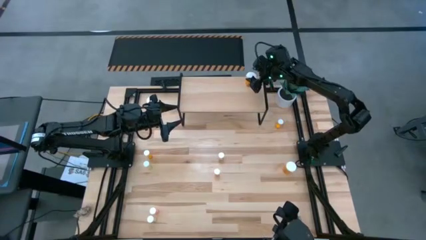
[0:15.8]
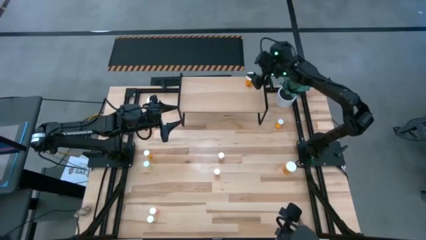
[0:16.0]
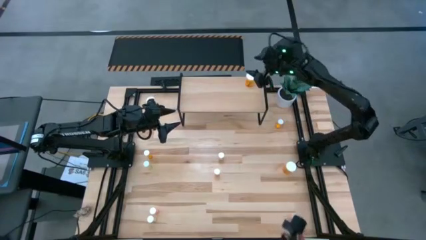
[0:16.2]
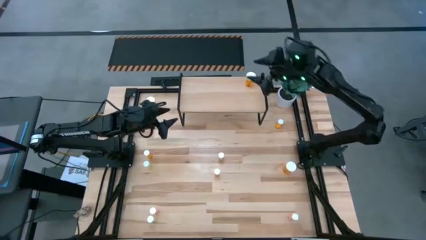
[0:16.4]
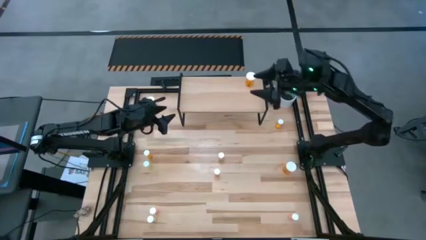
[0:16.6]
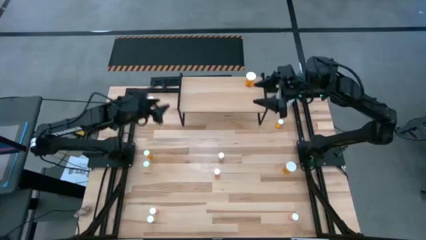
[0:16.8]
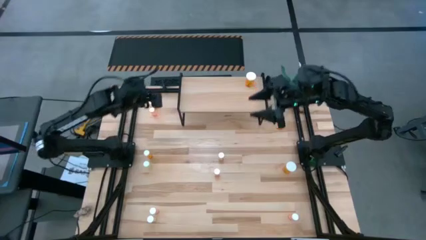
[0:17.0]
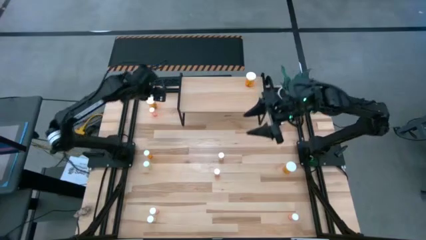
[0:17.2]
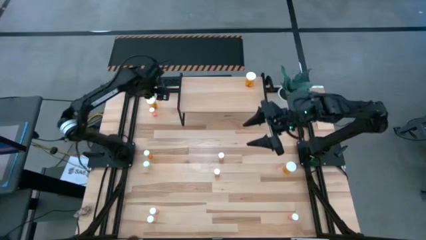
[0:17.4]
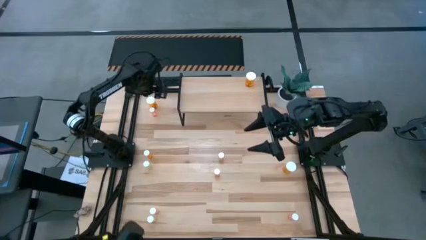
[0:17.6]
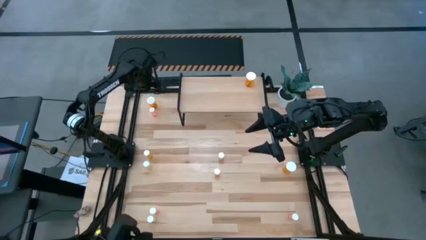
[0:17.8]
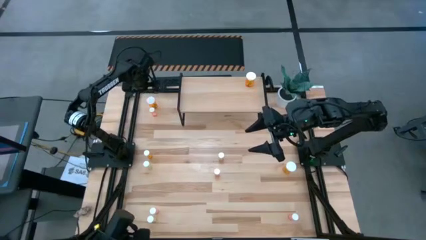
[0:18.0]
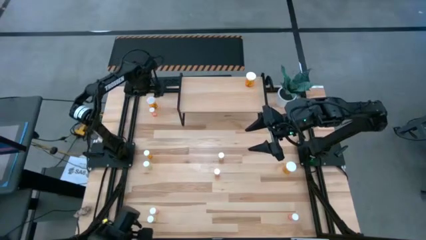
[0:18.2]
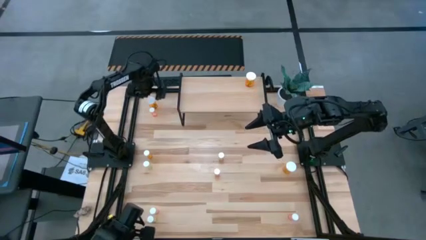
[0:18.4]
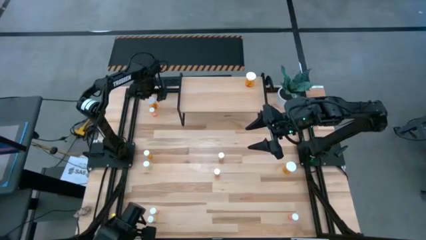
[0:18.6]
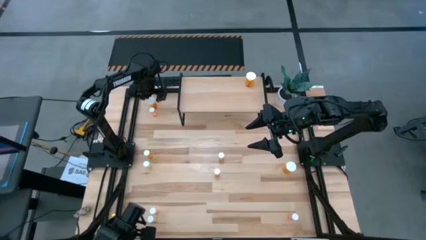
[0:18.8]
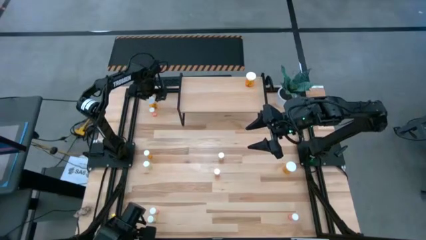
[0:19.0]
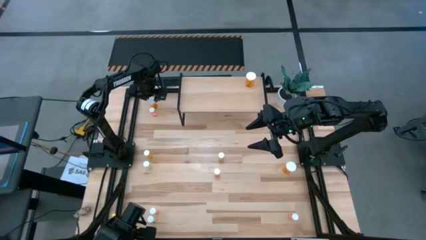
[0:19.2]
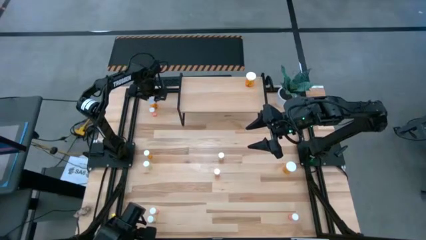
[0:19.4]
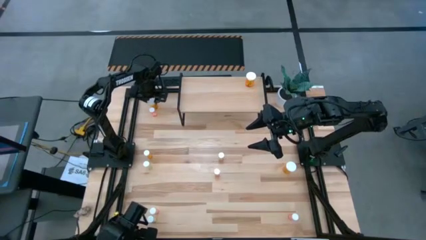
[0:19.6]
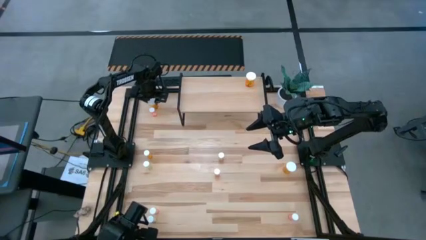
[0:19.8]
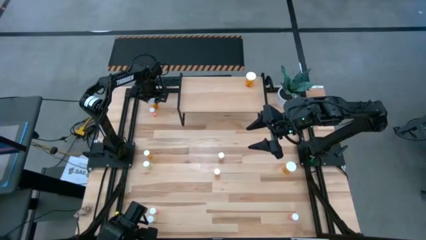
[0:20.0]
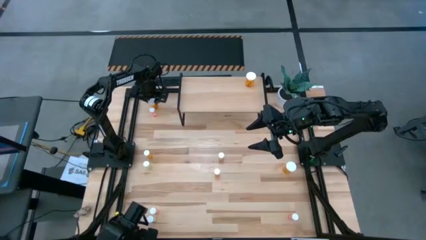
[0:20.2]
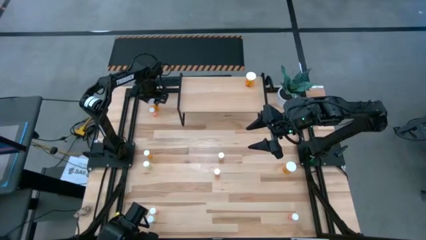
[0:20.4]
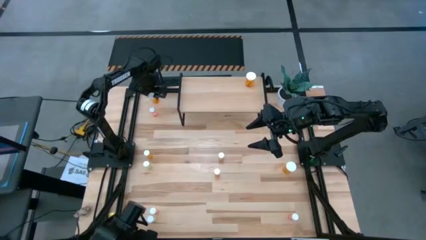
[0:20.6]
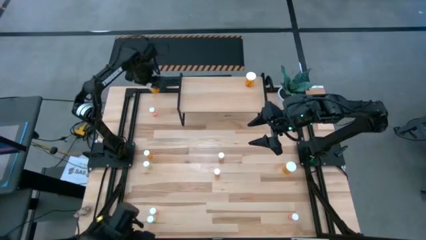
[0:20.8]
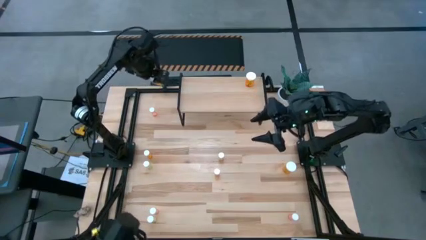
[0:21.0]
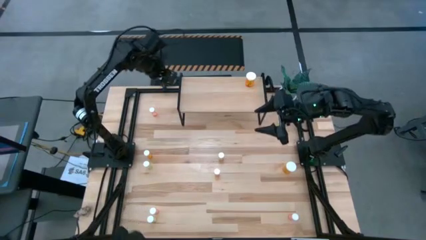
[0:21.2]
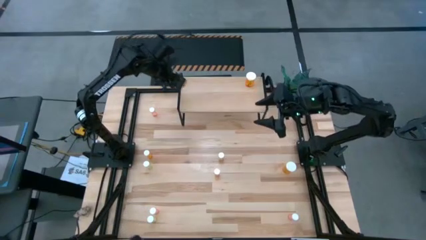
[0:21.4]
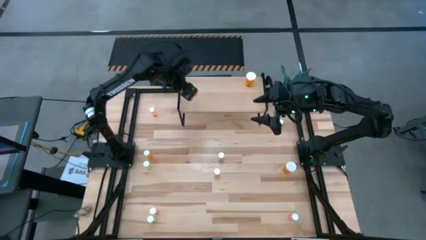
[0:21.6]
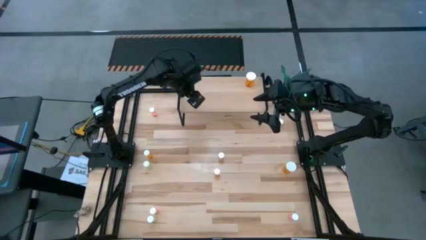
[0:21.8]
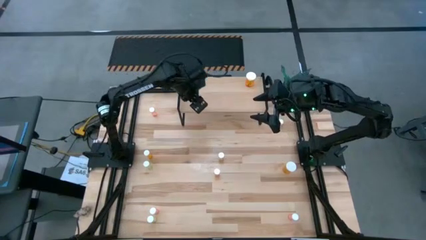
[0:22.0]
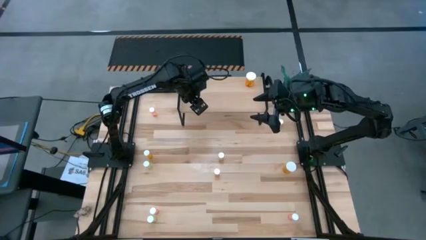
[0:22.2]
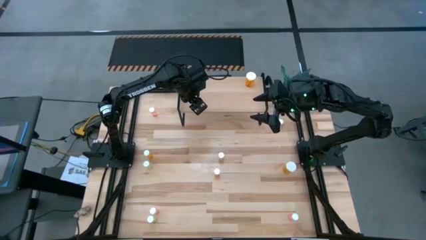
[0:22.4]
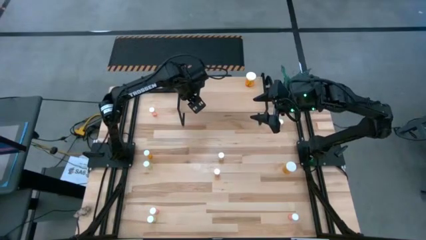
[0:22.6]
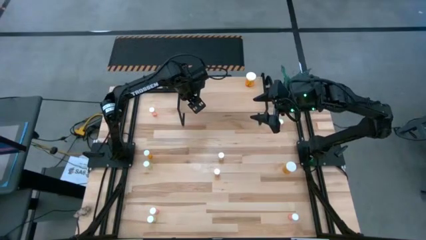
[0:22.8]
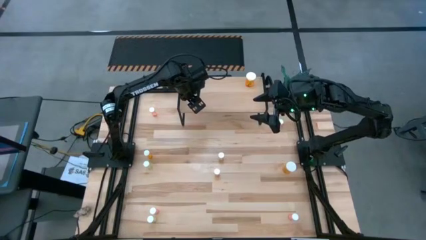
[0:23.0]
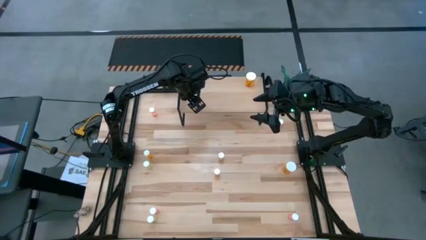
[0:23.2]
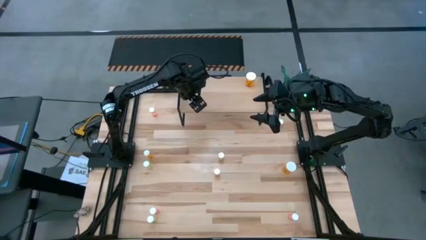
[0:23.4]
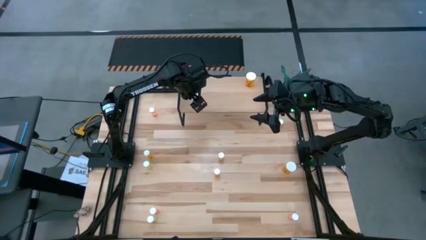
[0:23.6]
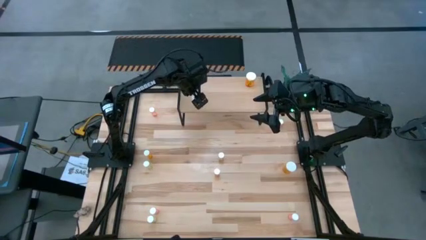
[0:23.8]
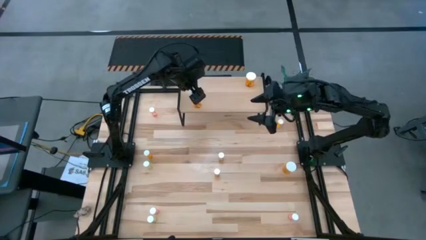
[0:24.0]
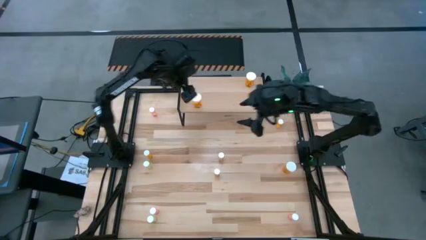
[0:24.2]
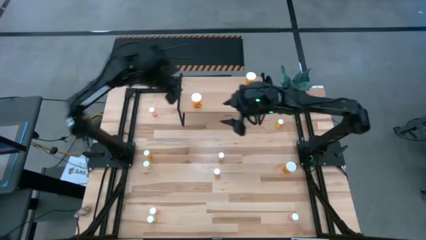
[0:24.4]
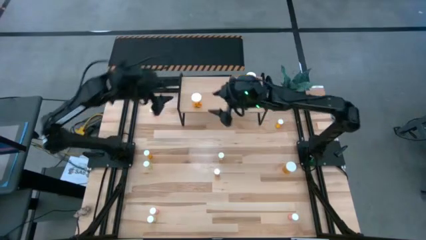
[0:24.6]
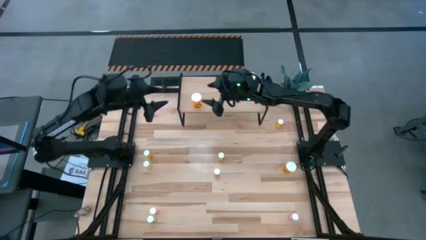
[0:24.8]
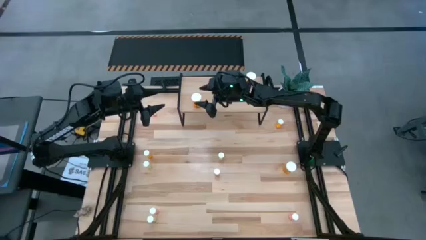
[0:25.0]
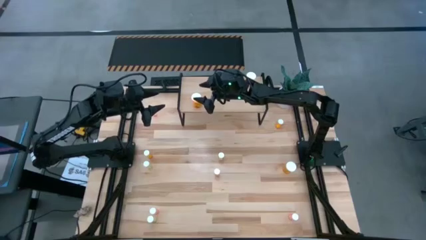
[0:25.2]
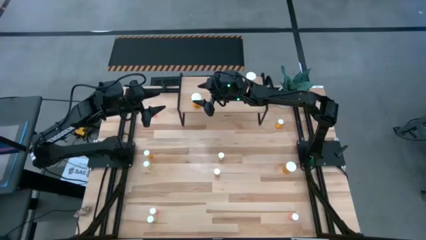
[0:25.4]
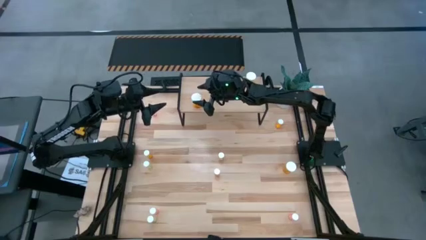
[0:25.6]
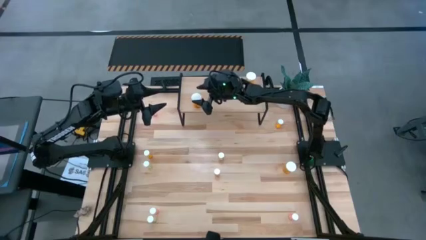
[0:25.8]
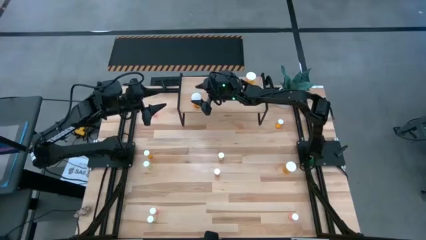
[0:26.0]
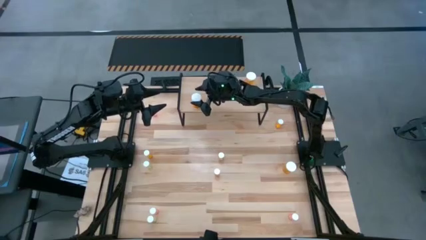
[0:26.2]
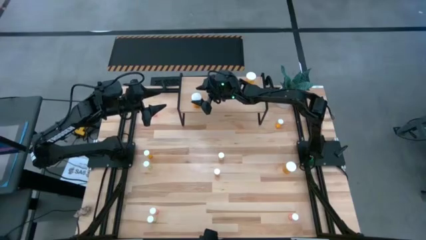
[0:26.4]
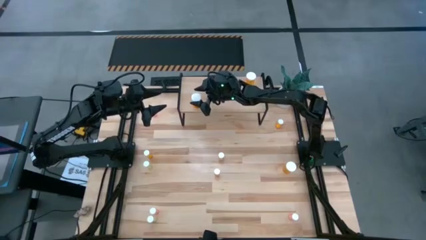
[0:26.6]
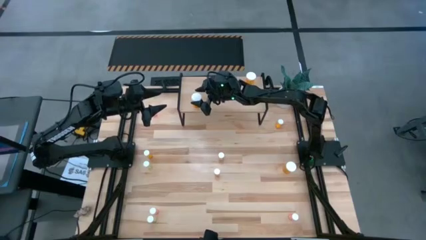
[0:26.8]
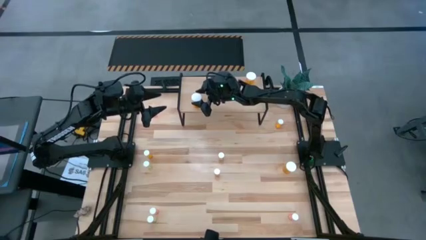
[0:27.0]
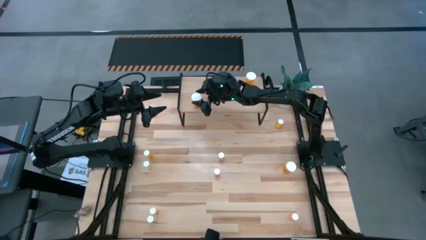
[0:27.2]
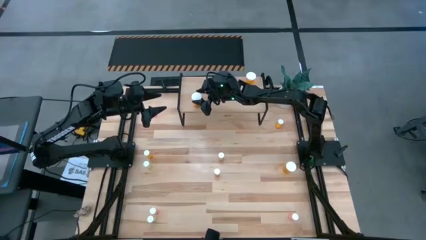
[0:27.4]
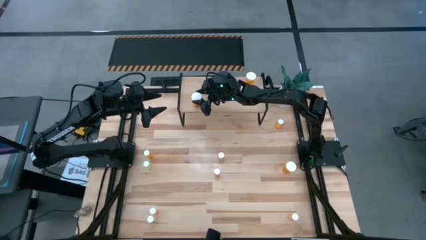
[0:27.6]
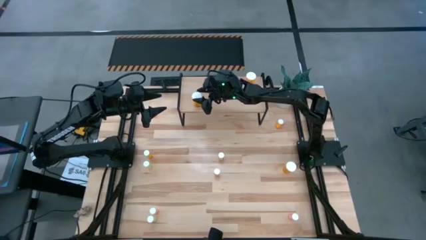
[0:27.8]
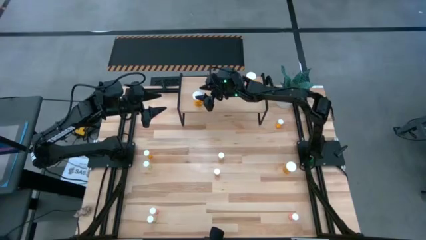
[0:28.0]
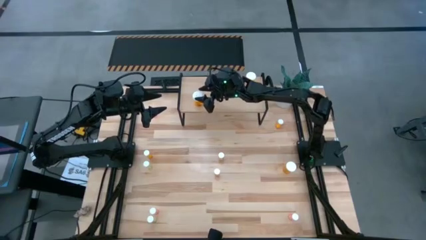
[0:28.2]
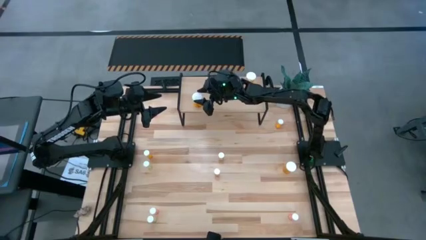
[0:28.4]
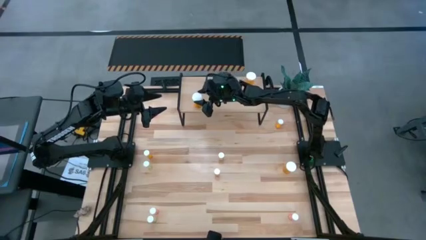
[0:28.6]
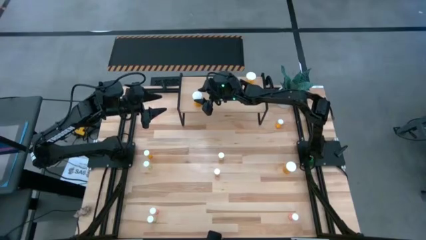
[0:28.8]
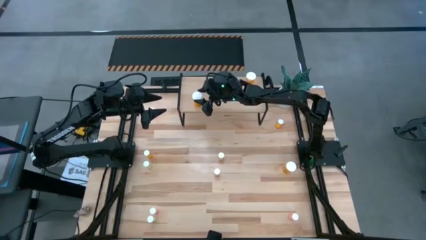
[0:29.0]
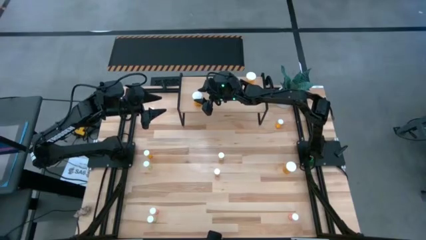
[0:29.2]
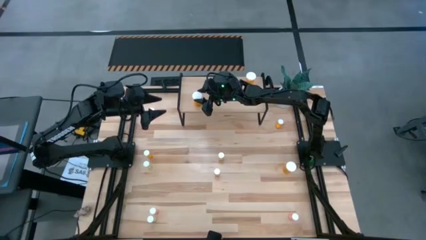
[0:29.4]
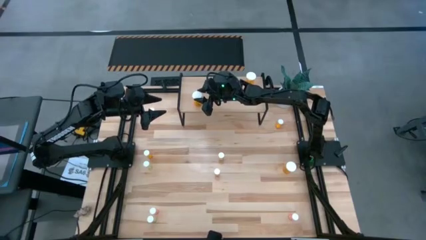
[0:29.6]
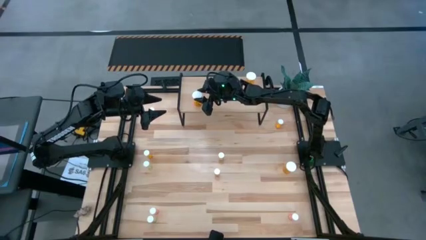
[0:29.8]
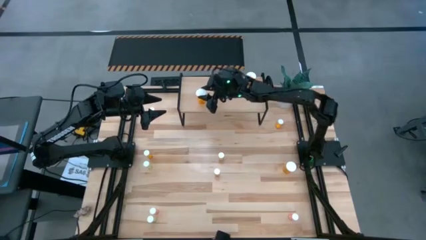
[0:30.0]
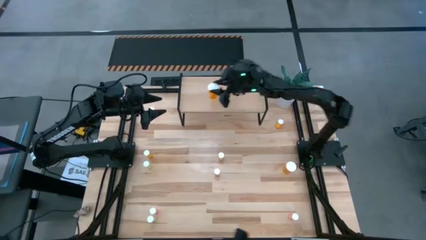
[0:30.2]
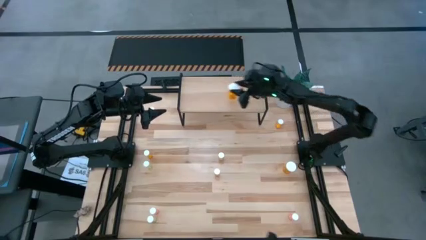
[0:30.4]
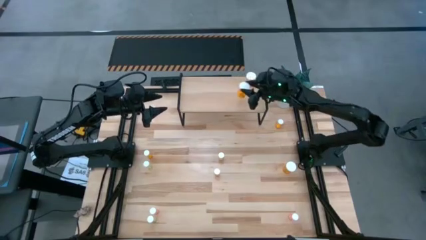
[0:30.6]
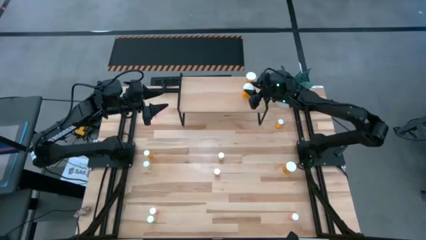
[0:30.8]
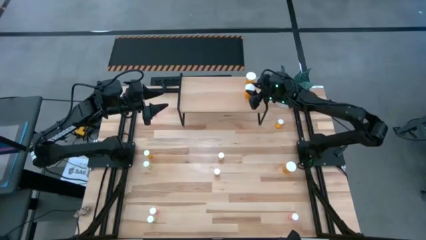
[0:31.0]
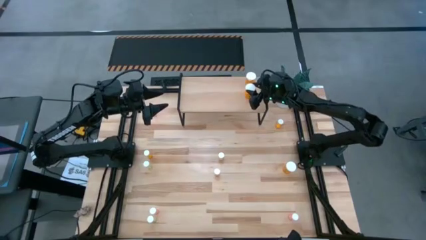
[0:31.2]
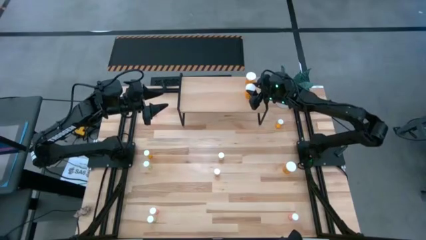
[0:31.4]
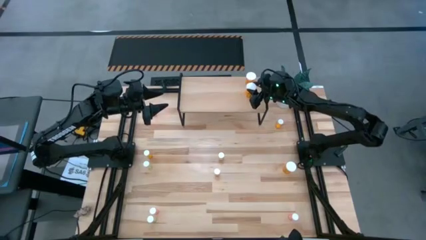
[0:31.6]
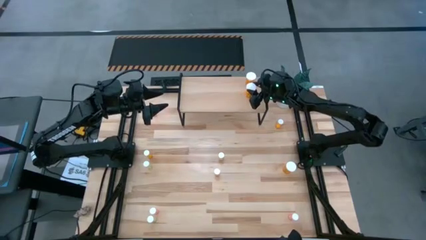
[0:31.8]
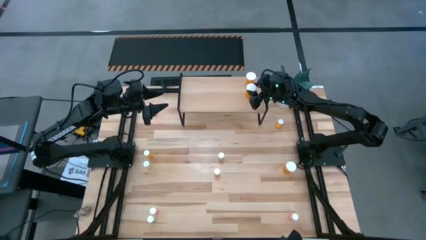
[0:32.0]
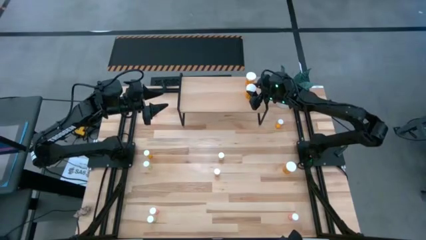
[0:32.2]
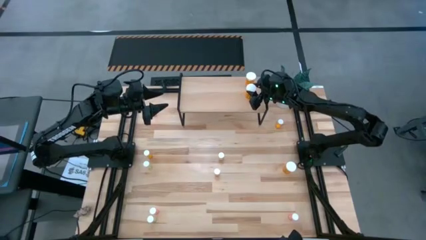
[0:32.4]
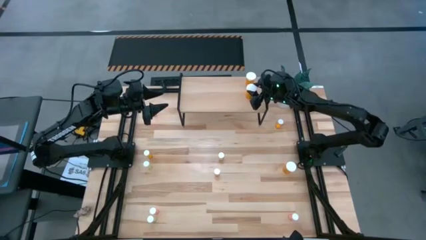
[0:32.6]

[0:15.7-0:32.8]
Task: Pick and place medicine bottles onto shelf by color
Put the top large orange pill bottle on the shelf aligned with the other large orange pill bottle
